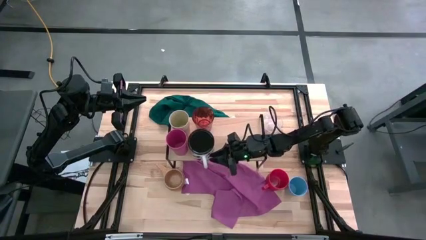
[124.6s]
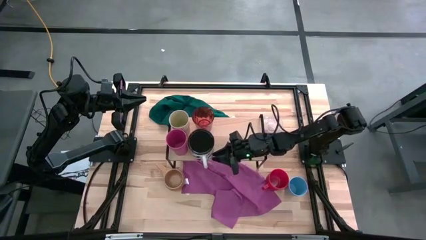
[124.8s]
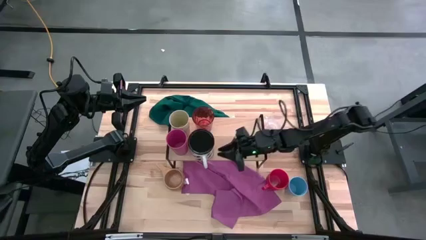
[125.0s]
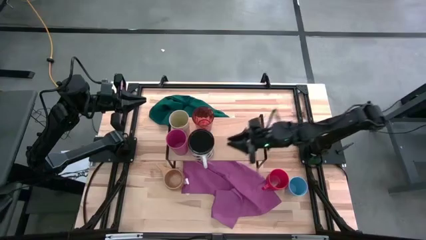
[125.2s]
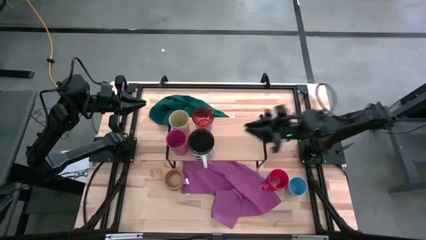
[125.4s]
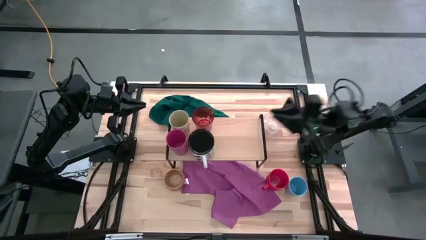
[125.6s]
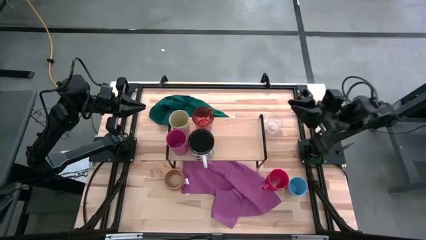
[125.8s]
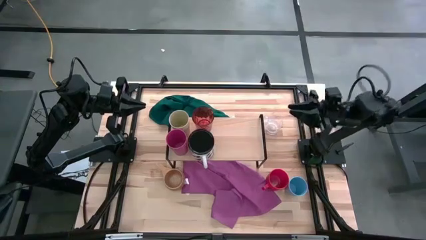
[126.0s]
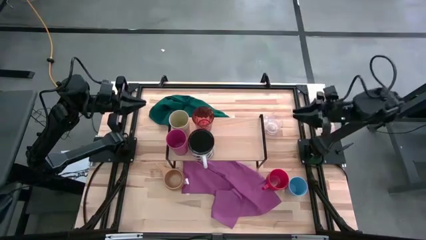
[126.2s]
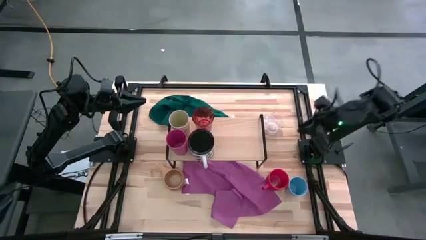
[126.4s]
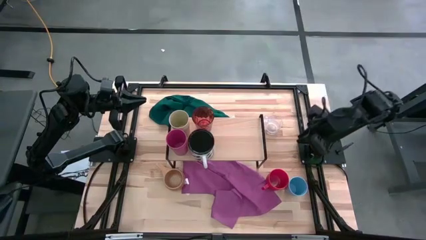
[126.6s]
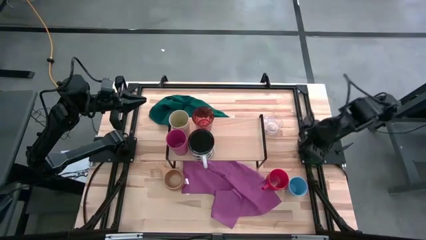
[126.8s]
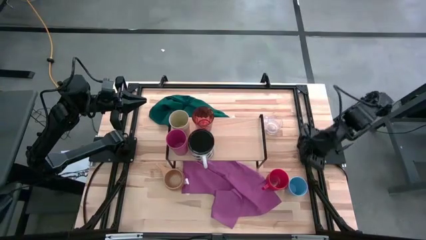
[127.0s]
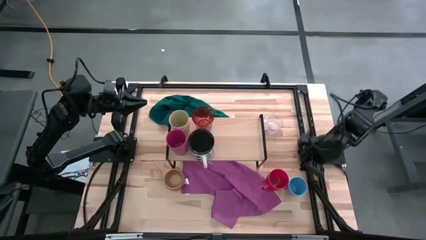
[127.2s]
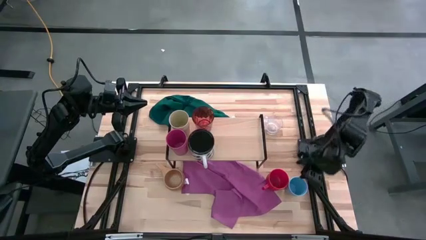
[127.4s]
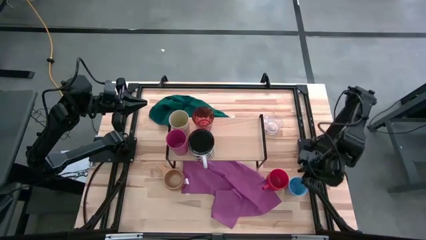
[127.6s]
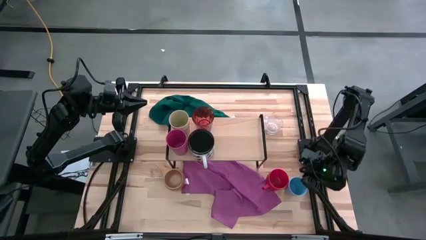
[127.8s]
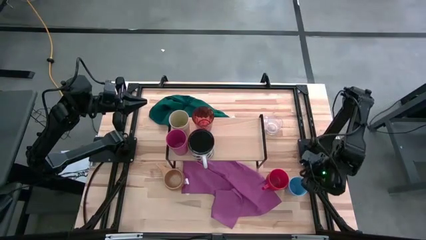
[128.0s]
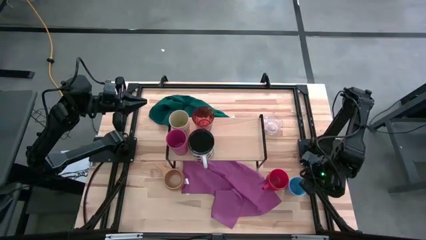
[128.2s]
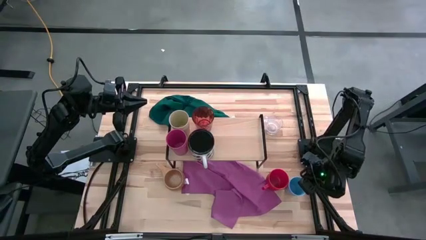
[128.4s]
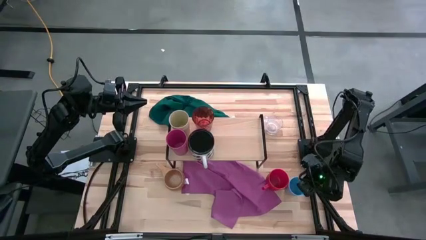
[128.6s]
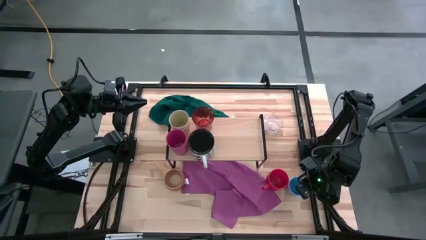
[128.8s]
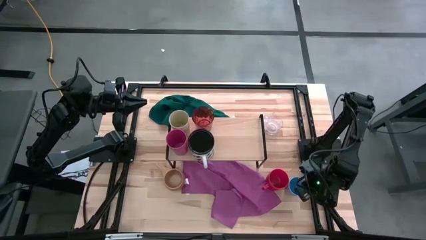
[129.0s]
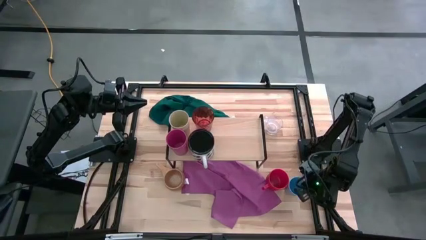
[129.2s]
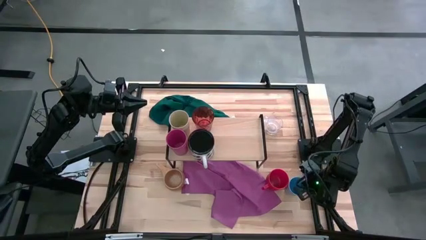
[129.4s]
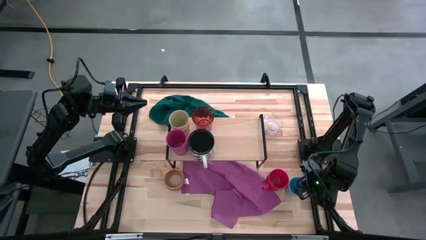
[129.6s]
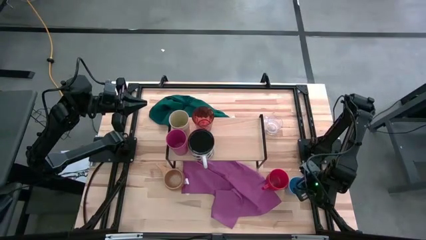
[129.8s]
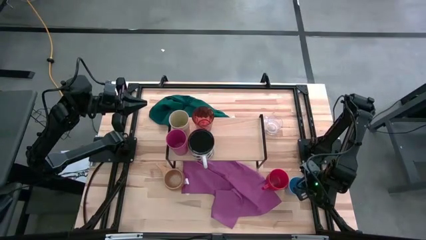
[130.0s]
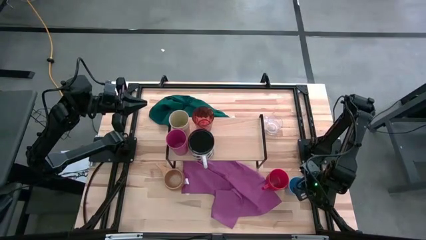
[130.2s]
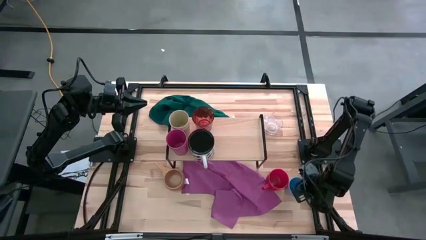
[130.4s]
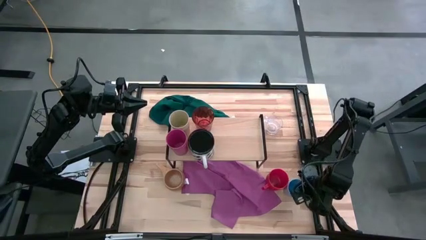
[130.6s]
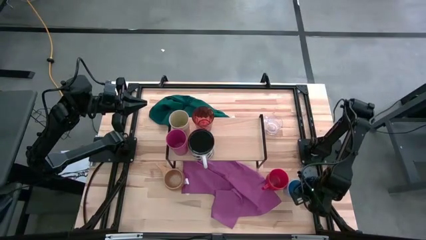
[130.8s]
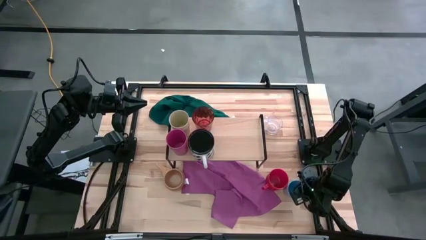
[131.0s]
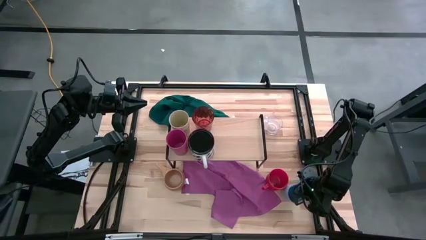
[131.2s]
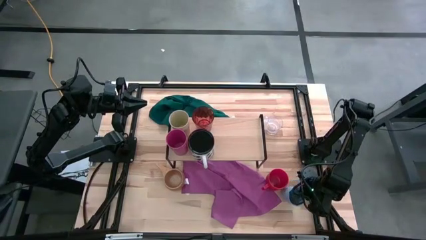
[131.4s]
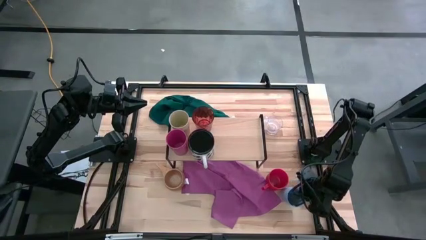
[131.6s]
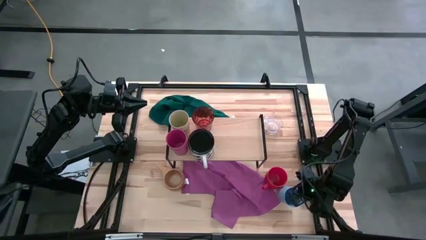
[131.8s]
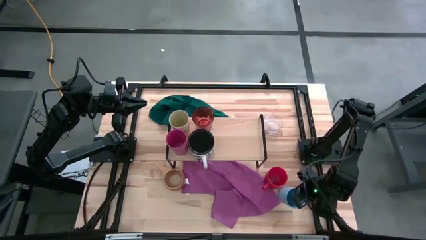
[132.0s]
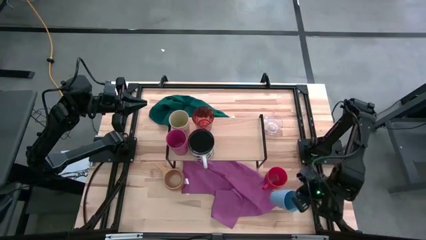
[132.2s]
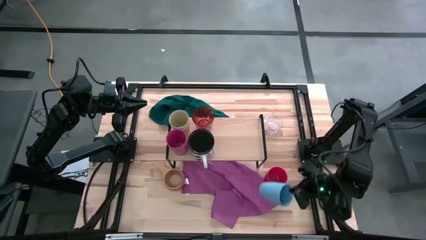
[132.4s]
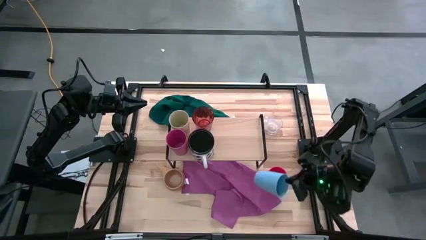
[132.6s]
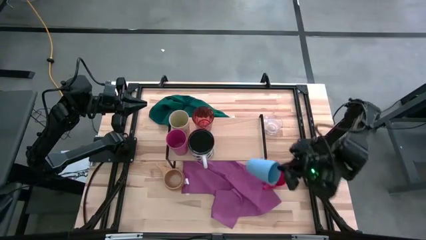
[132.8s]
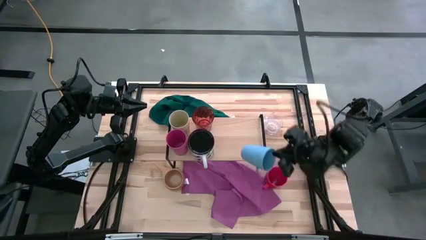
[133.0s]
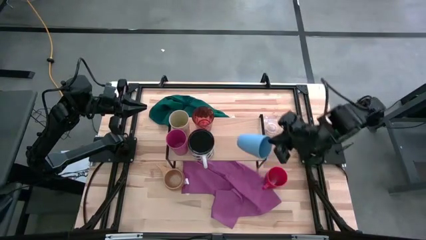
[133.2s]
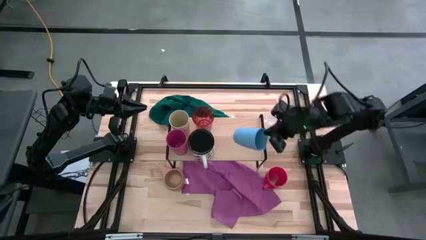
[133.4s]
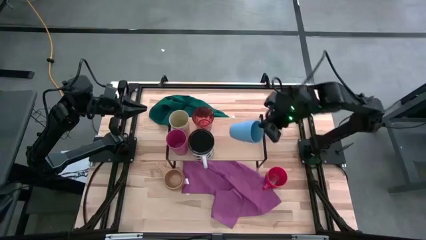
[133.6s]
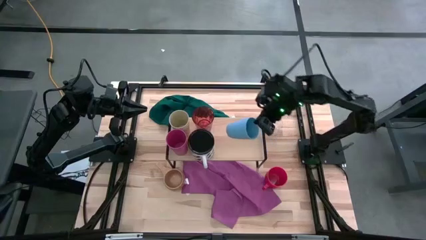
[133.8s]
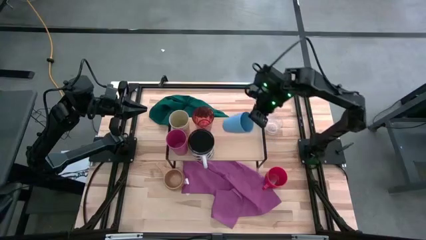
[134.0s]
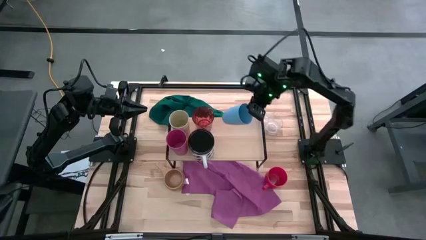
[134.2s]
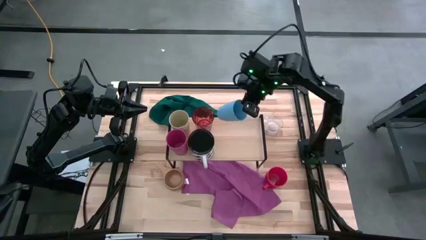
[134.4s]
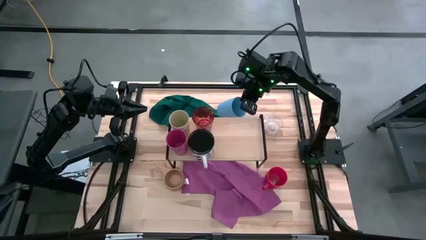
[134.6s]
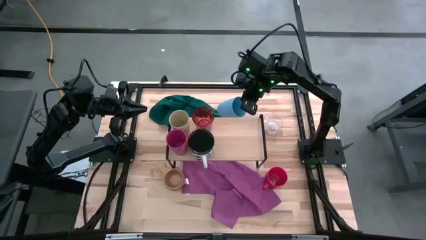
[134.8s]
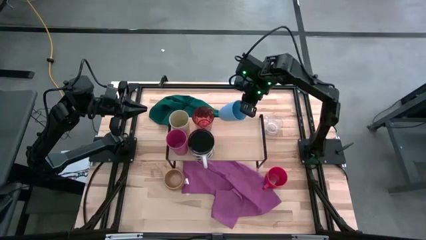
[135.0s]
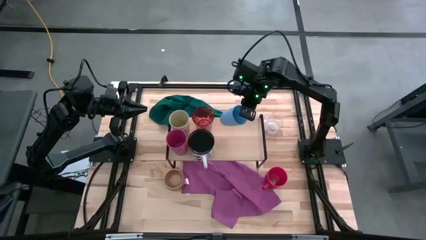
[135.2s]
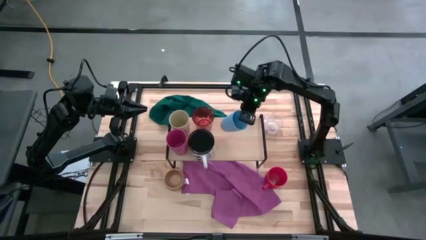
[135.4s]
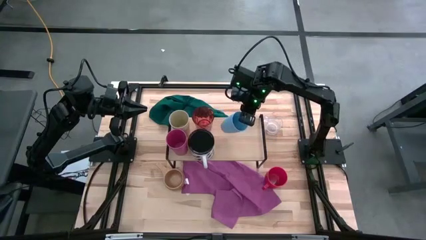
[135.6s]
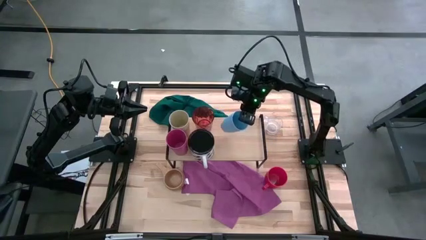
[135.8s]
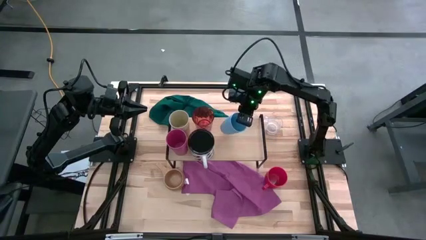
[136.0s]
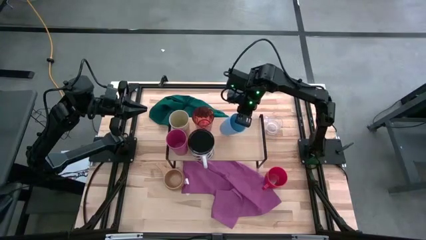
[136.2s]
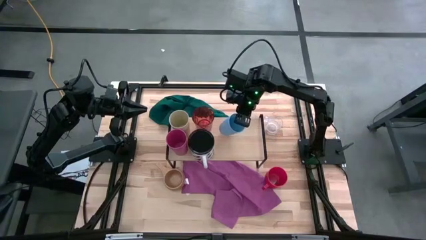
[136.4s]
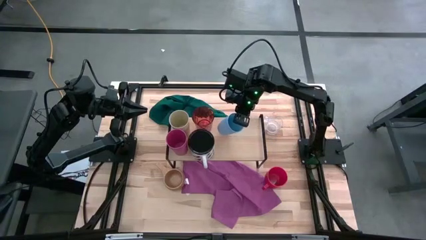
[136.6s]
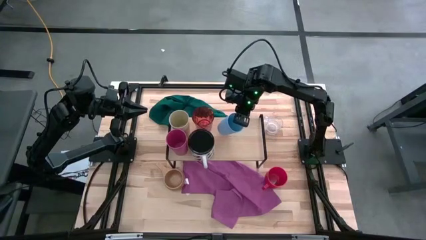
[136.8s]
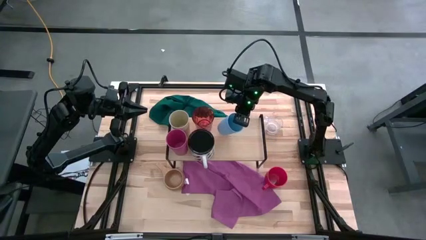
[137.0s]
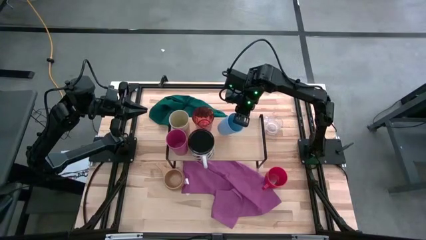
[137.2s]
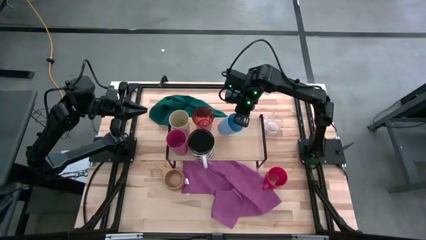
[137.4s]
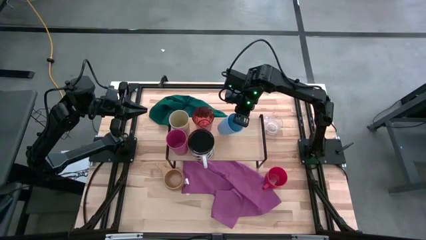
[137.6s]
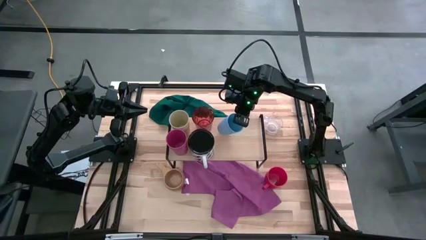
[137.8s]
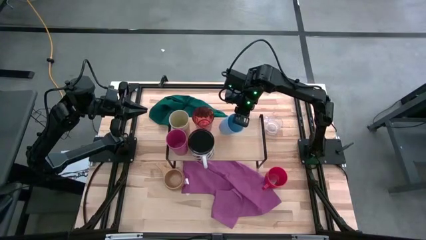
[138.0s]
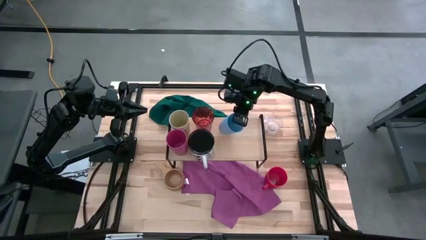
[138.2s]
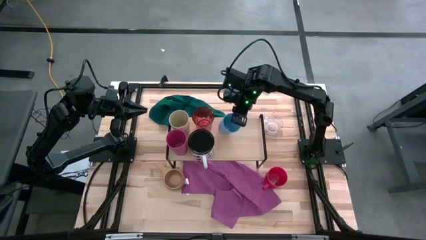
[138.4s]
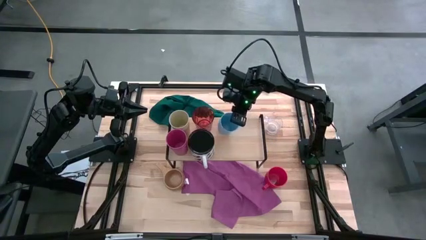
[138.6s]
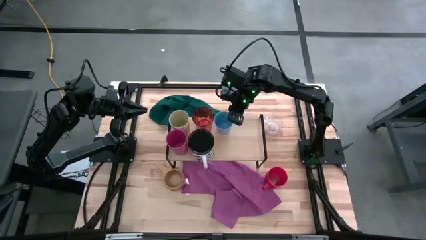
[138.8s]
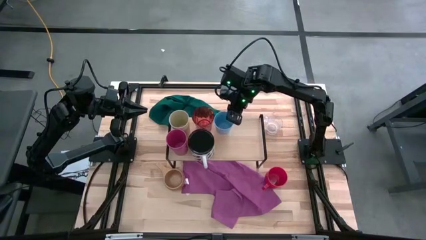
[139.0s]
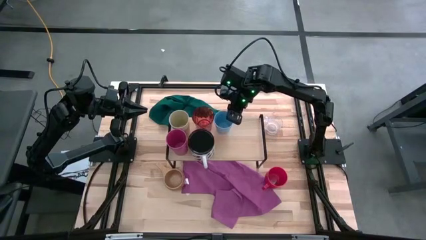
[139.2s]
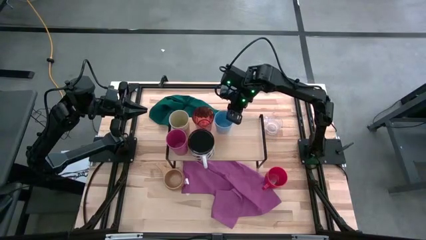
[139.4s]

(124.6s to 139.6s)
Task: Stack small to large cups/mugs on shelf
Put the blue cup on the shelf
